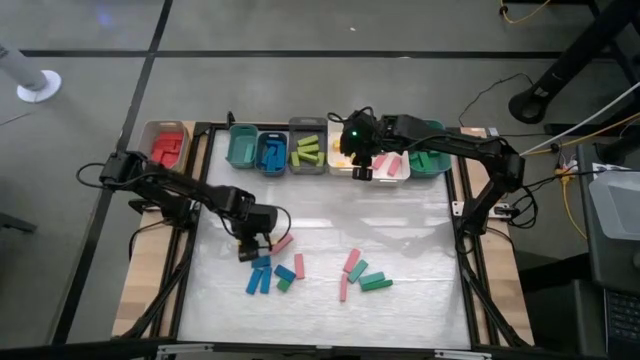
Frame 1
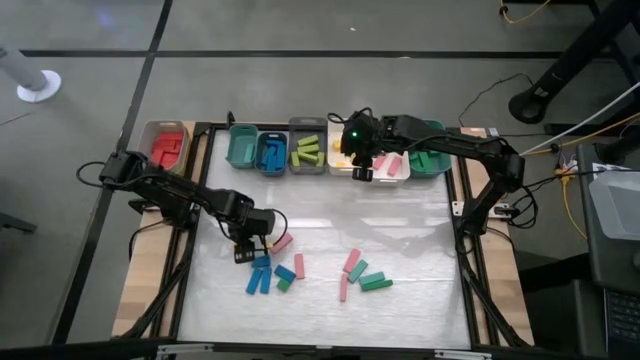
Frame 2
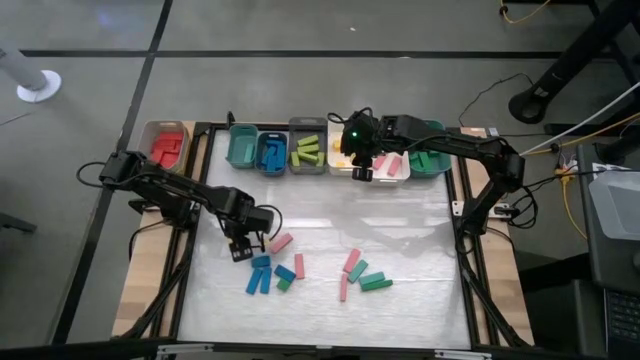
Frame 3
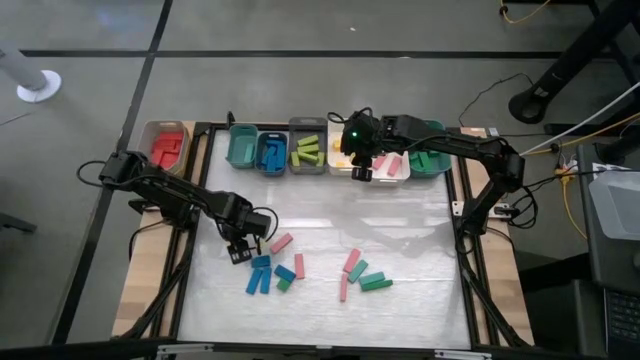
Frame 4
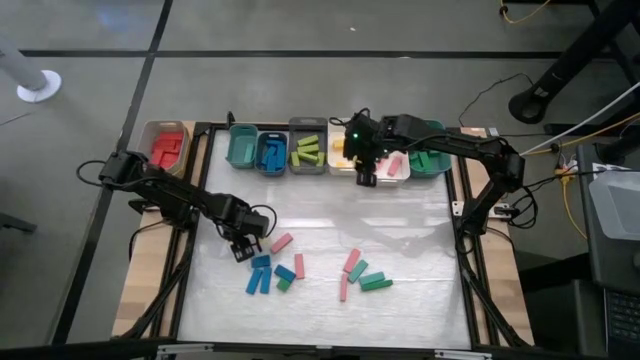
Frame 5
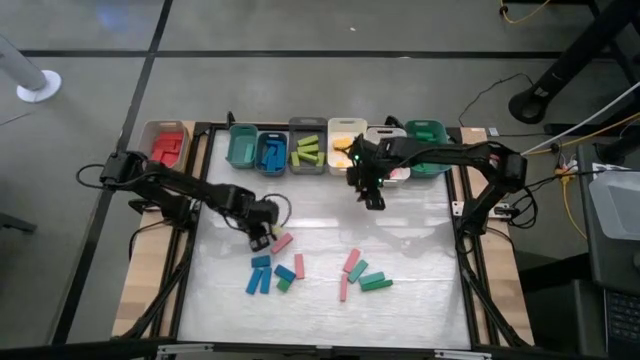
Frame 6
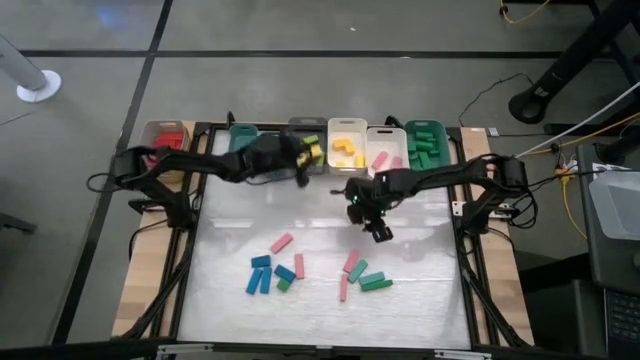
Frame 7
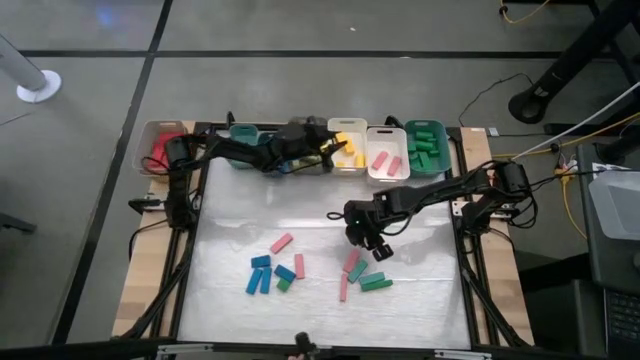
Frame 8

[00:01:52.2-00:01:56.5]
Task: Sort blocks
Put the yellow block into the left white bin

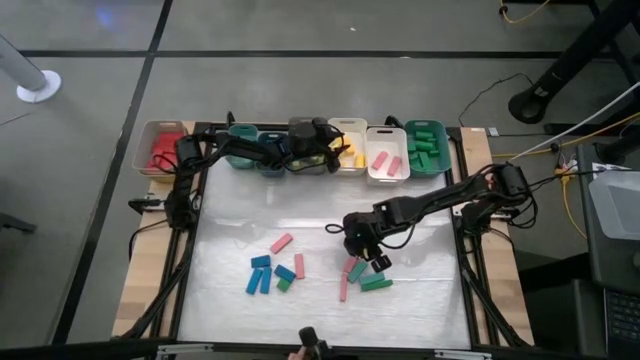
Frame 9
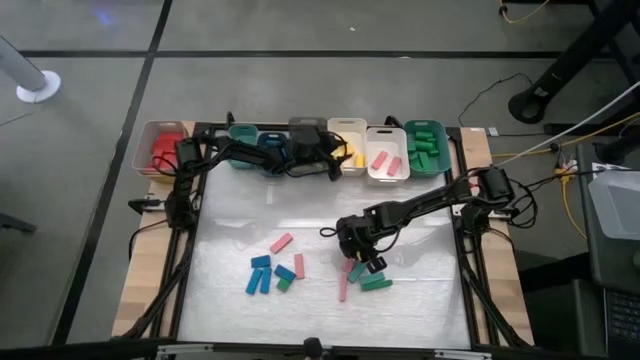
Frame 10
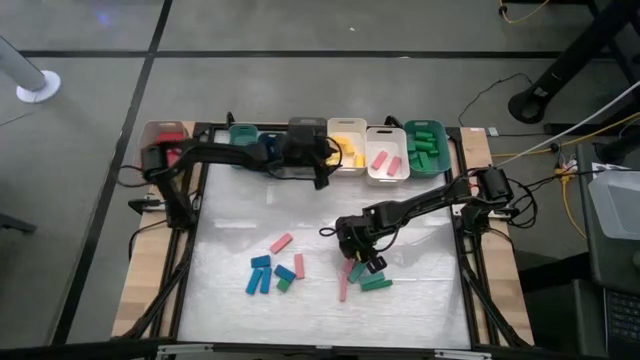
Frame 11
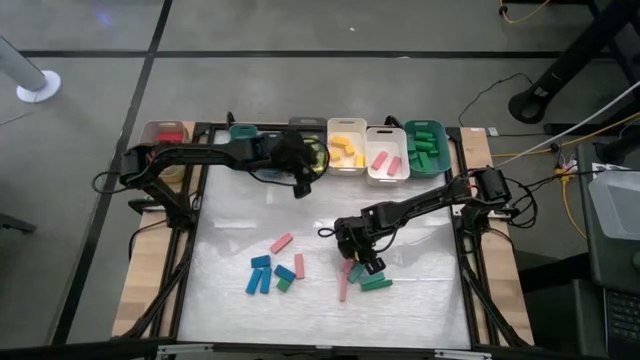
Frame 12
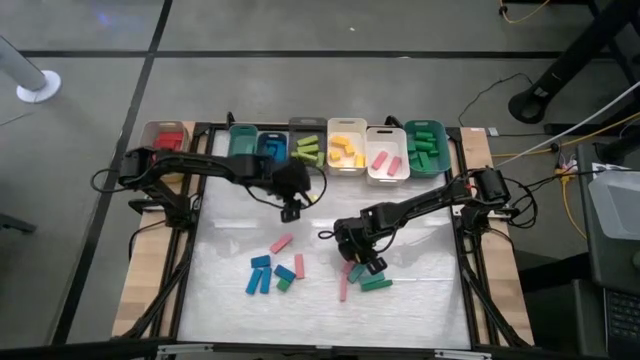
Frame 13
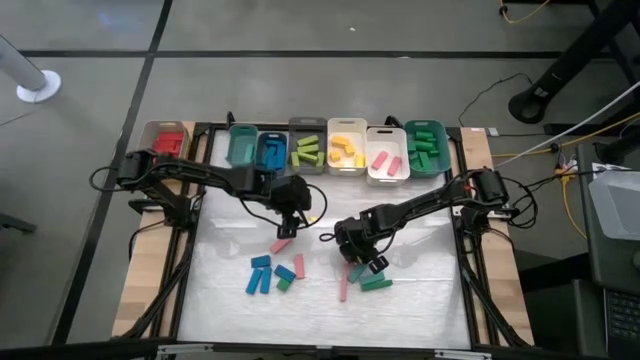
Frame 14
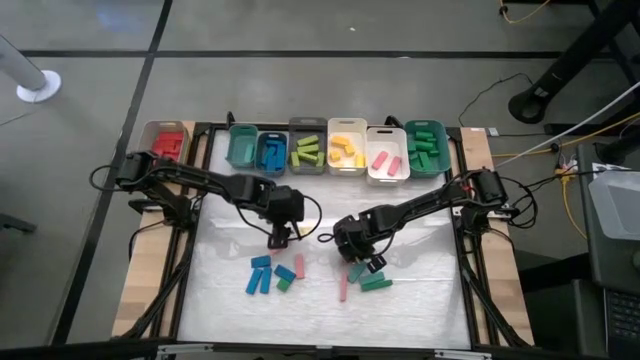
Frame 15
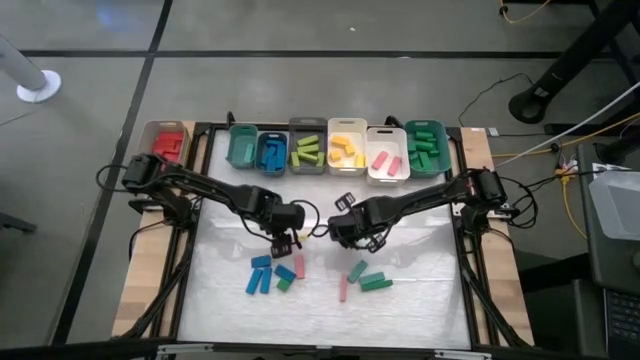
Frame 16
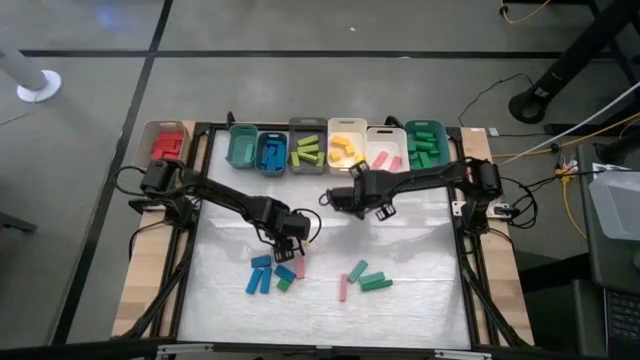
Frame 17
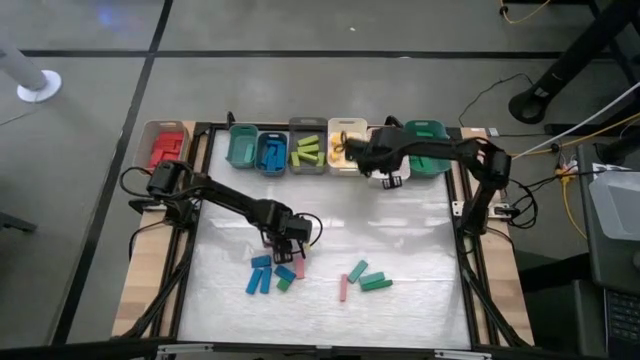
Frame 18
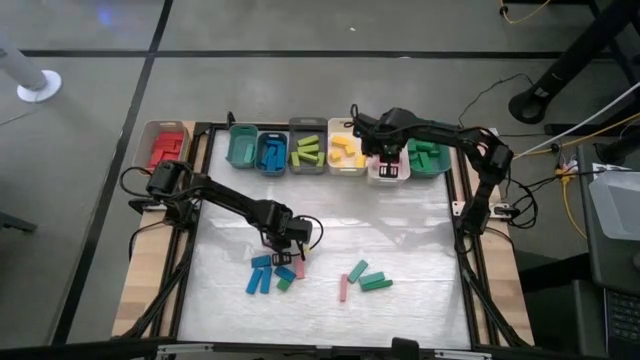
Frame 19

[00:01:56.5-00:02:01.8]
Put the pink block into the right white bin

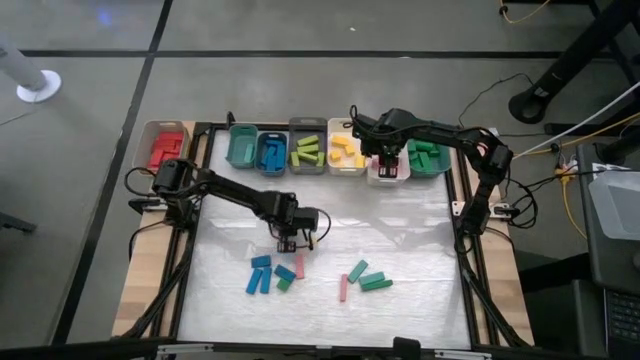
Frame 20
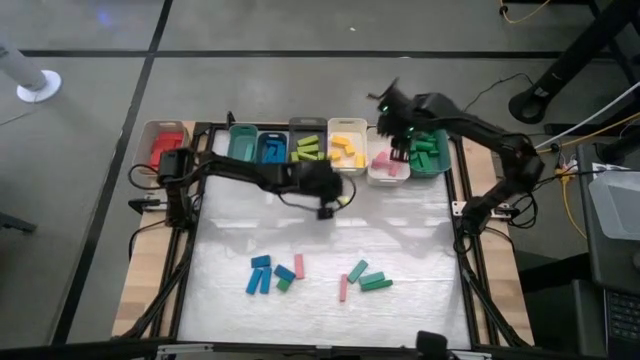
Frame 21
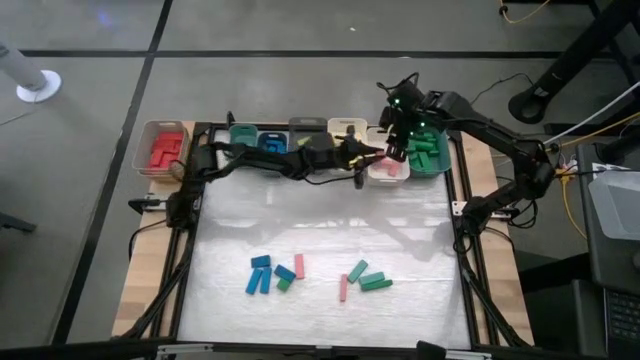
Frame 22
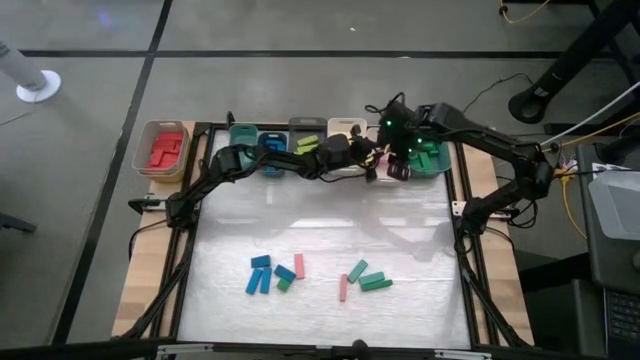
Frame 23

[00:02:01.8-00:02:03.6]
Put the pink block into the right white bin

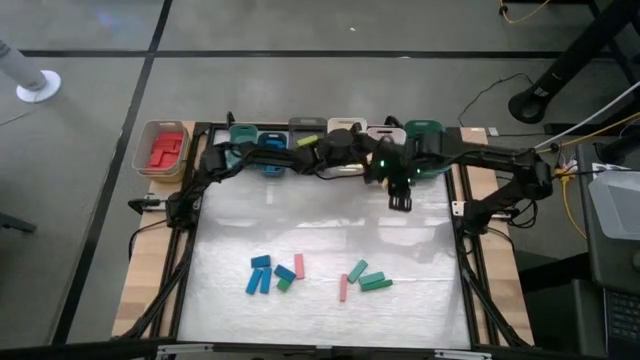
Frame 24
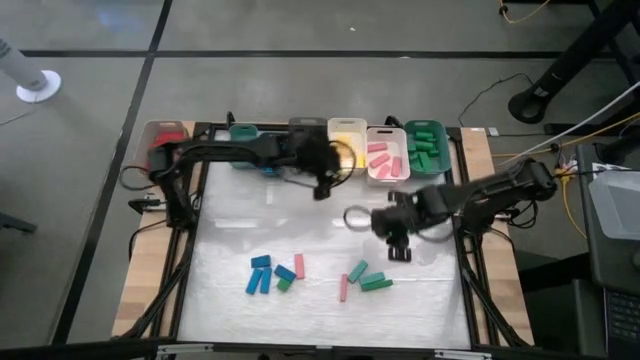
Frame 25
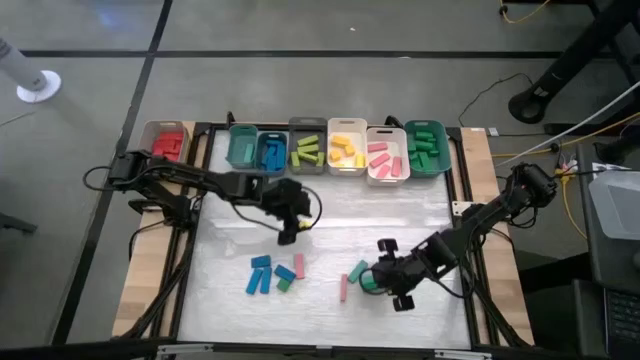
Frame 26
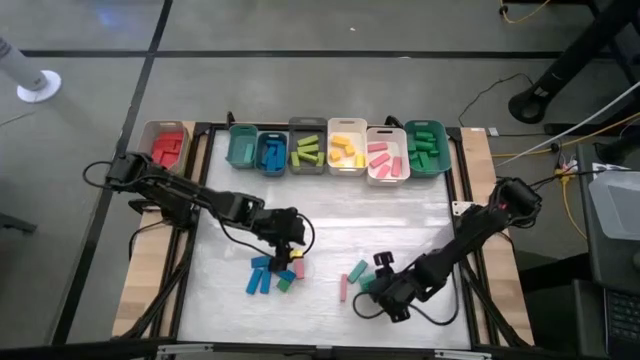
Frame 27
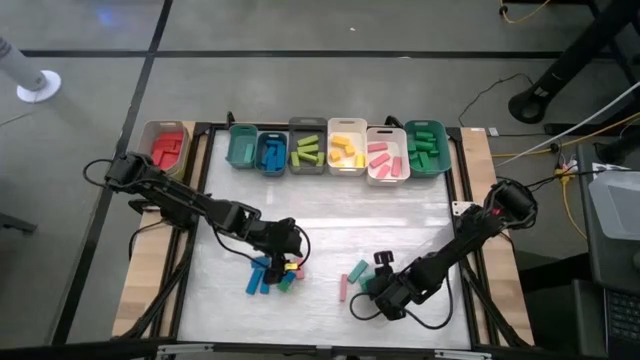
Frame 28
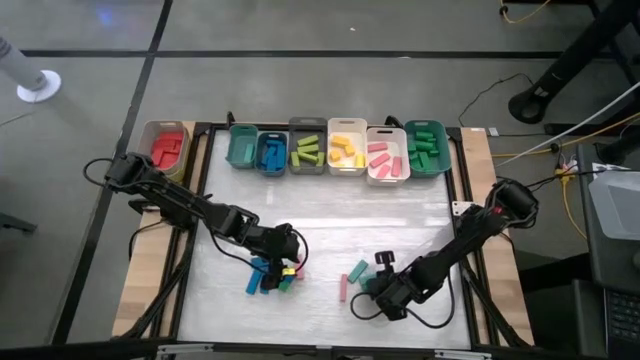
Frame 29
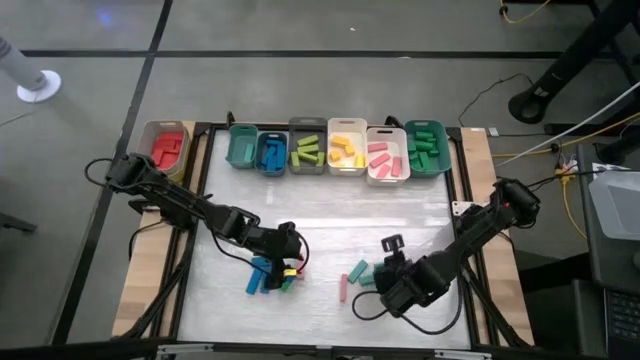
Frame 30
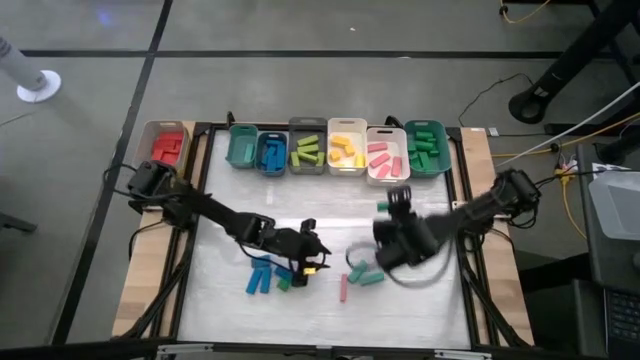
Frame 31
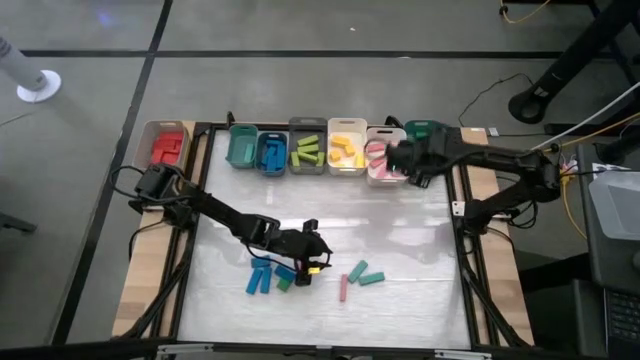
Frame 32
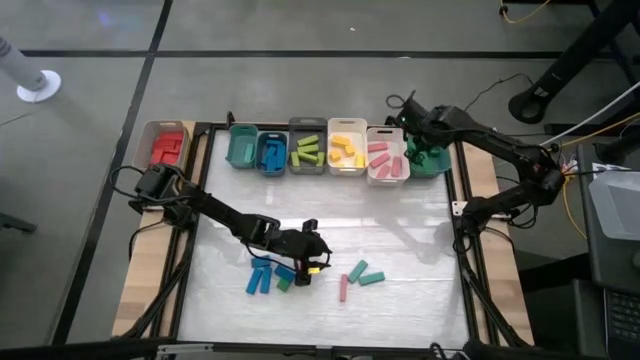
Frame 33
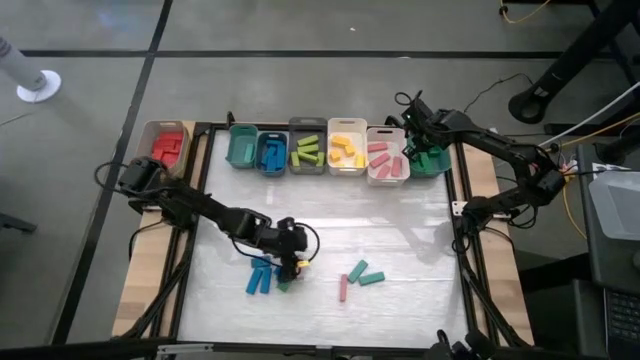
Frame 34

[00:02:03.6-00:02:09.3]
Put the green block into the right green bin

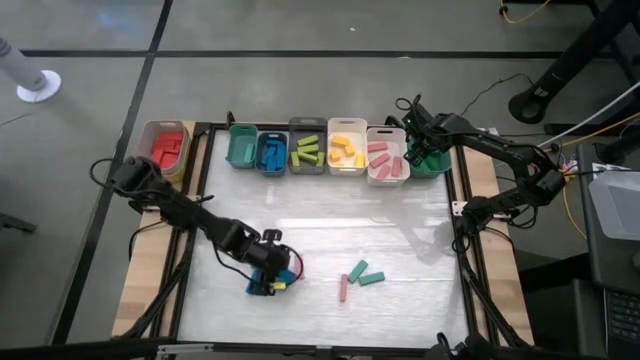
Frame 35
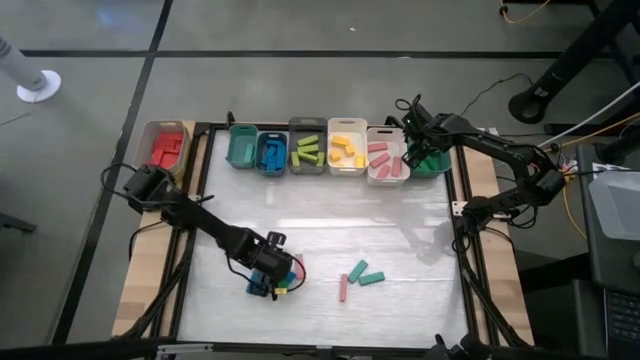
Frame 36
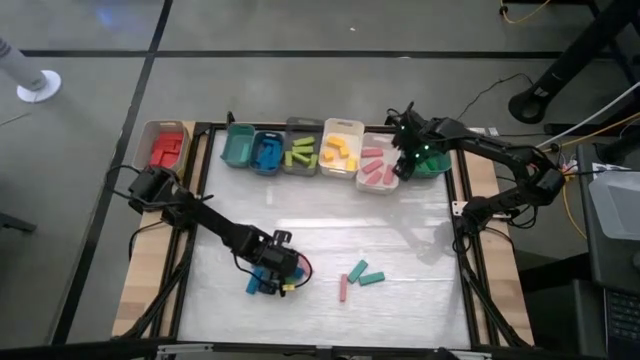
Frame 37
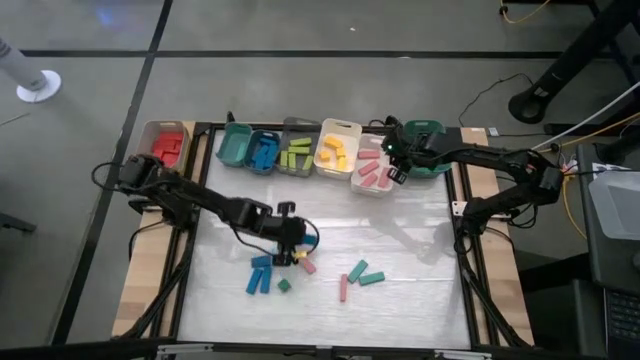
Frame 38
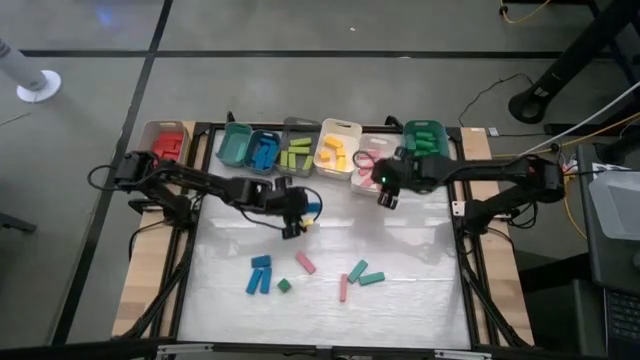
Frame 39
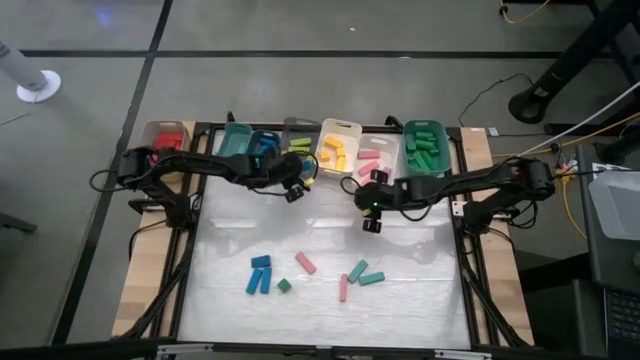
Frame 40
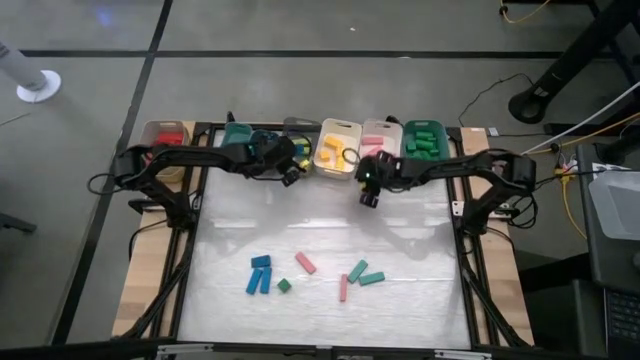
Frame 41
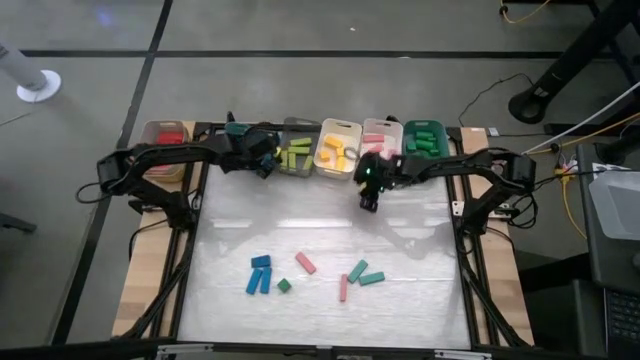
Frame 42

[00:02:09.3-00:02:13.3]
Put the blue block into the blue bin

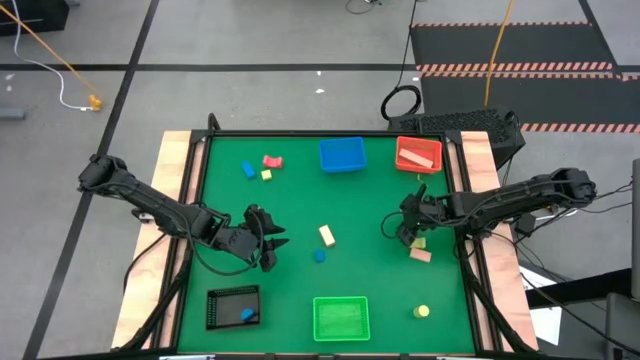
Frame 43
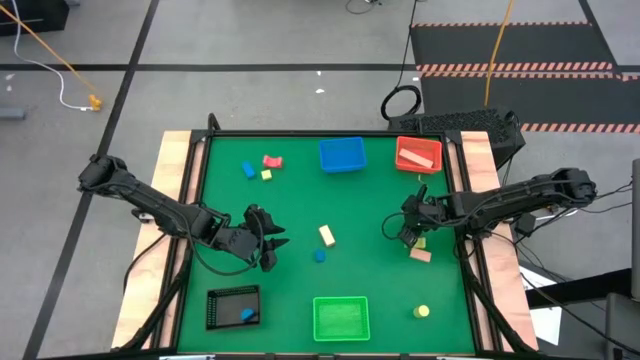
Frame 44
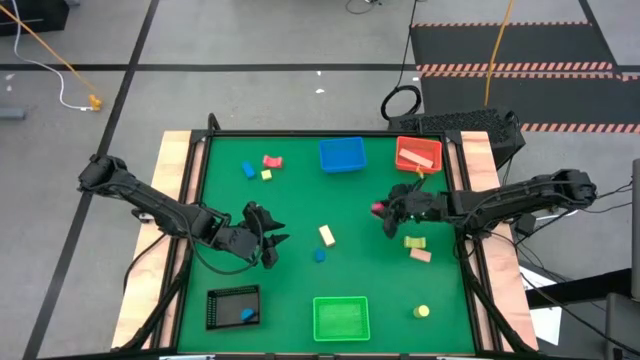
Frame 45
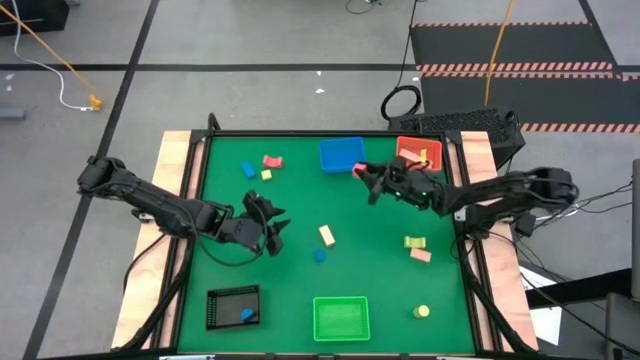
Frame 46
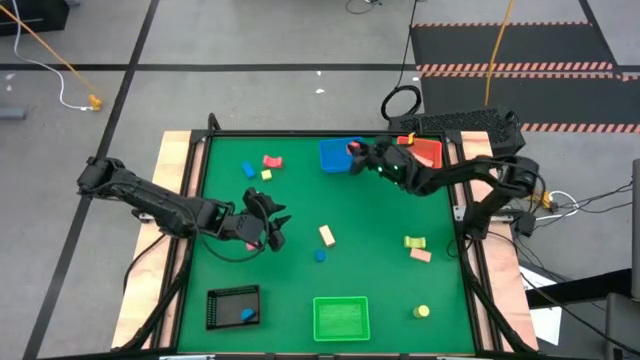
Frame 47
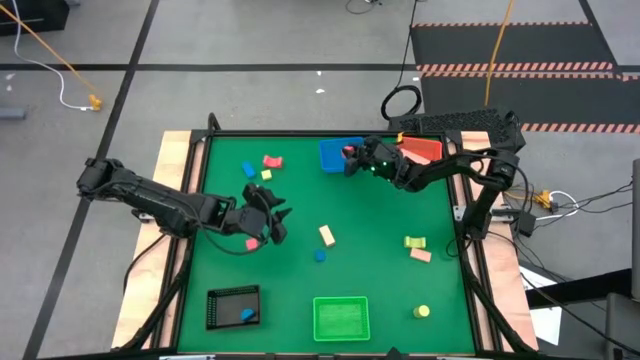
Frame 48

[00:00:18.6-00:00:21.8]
Task: Sort & place blocks by color
Put the pink block into the blue bin
